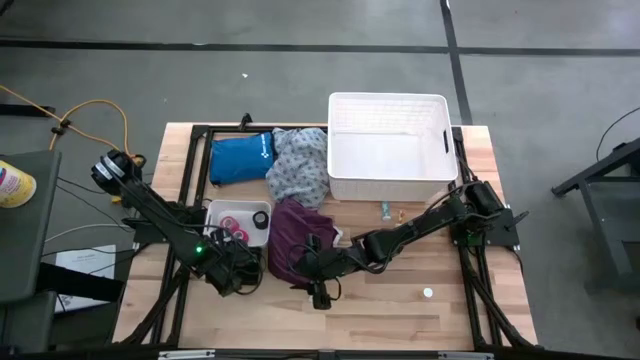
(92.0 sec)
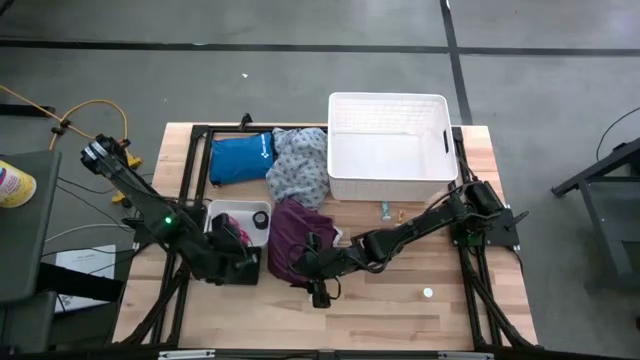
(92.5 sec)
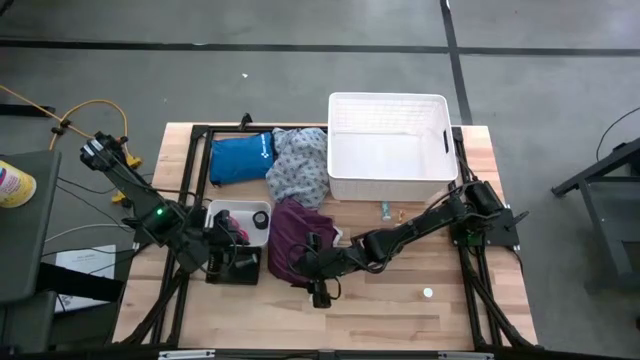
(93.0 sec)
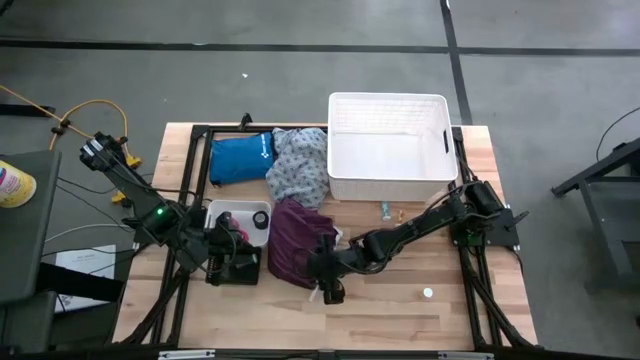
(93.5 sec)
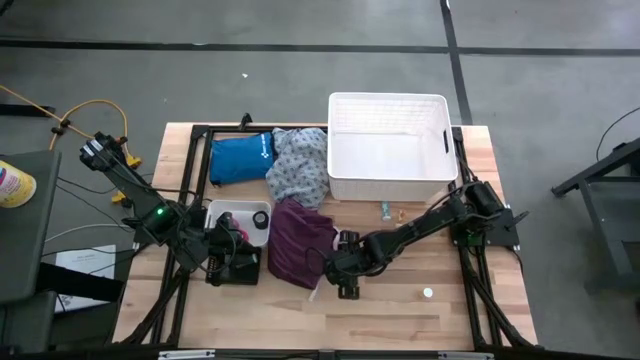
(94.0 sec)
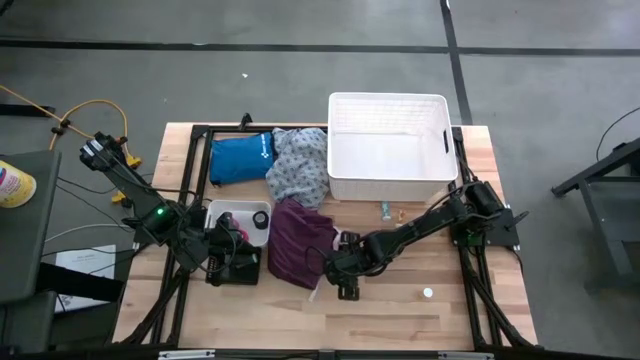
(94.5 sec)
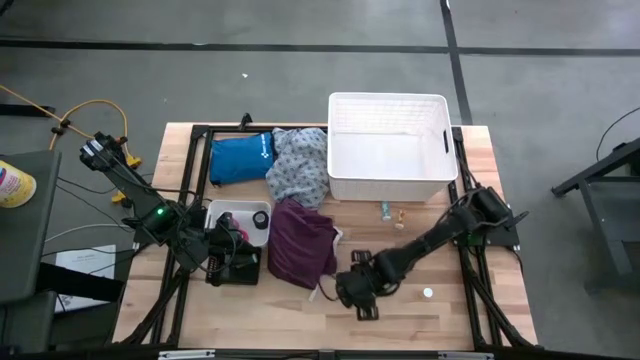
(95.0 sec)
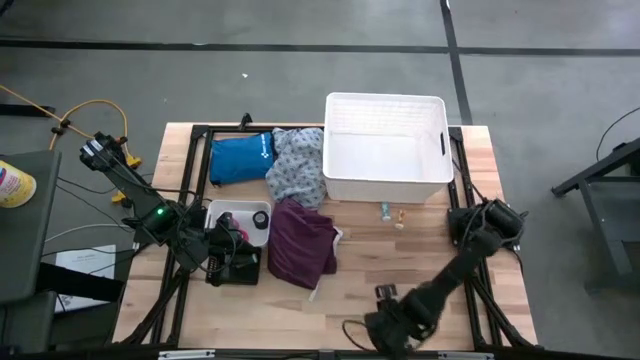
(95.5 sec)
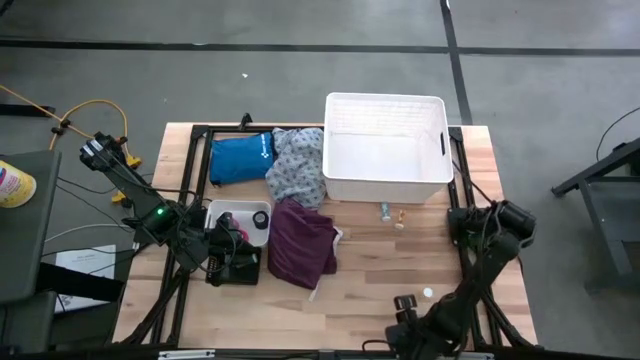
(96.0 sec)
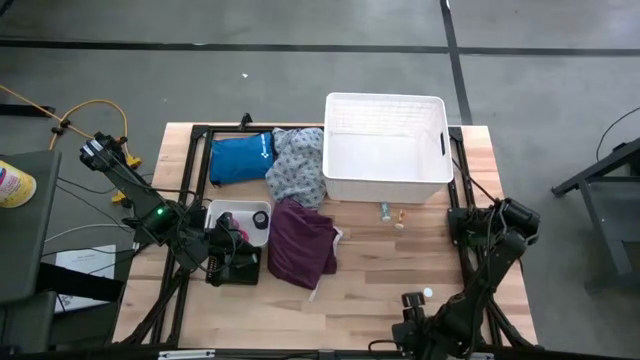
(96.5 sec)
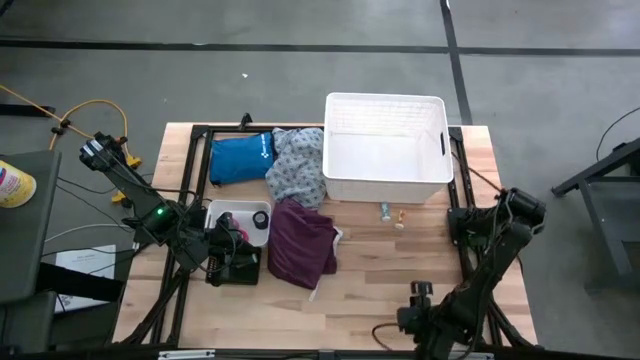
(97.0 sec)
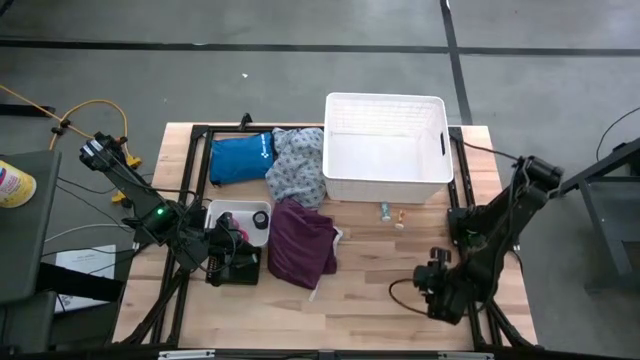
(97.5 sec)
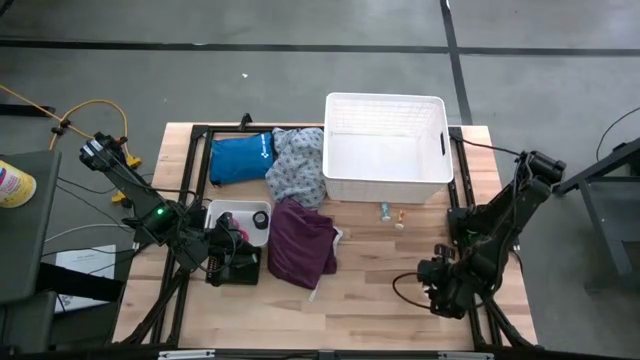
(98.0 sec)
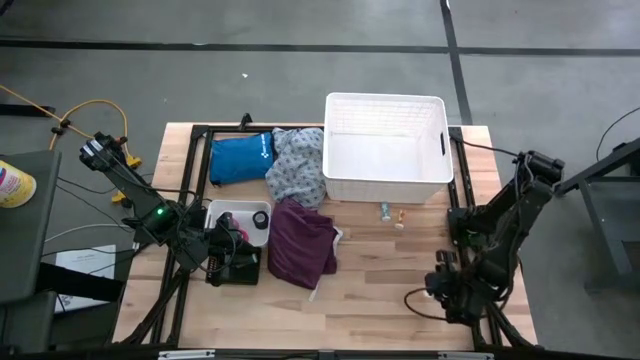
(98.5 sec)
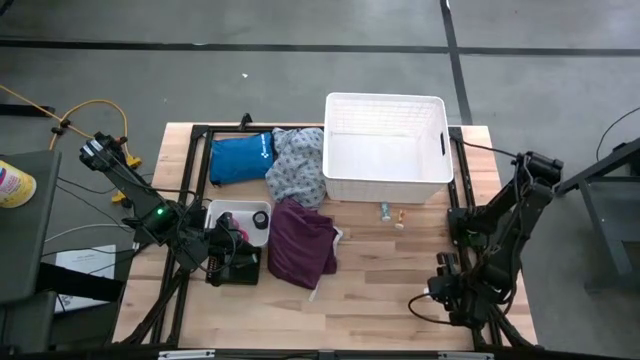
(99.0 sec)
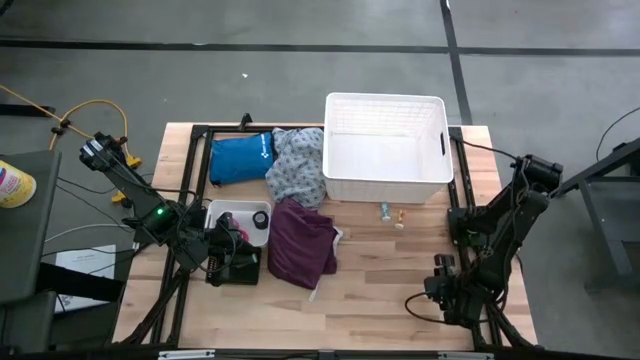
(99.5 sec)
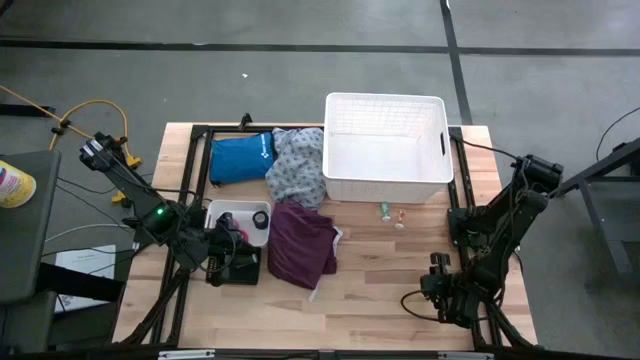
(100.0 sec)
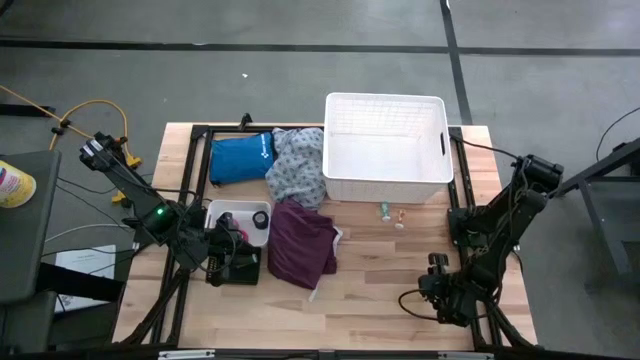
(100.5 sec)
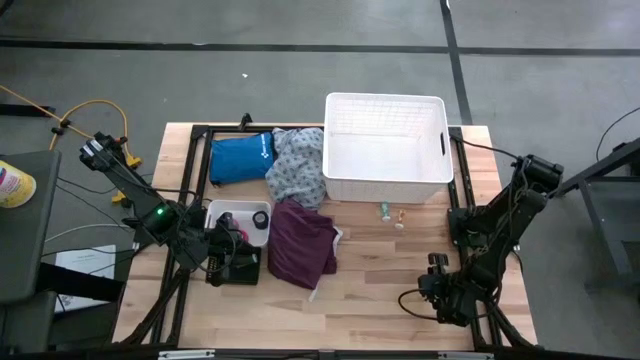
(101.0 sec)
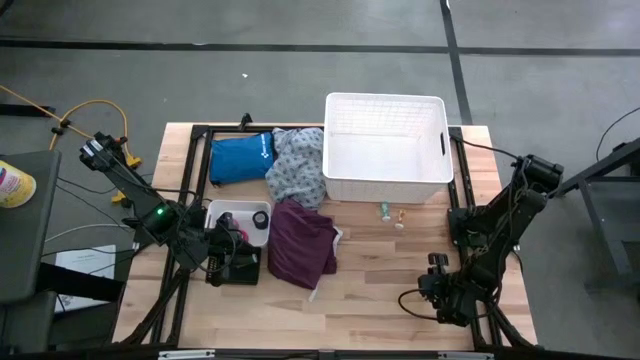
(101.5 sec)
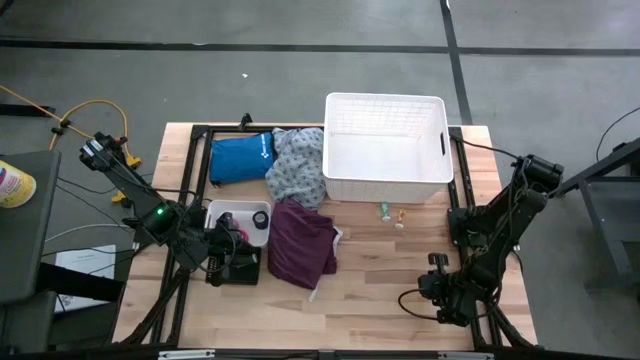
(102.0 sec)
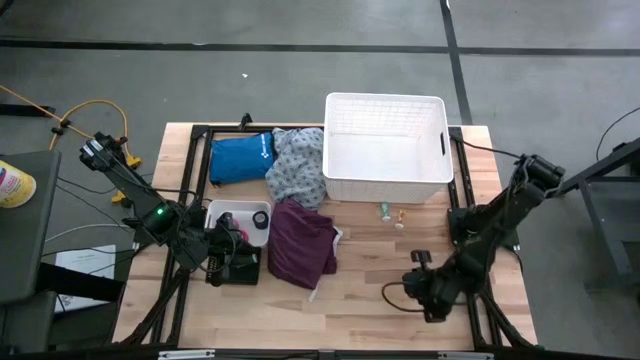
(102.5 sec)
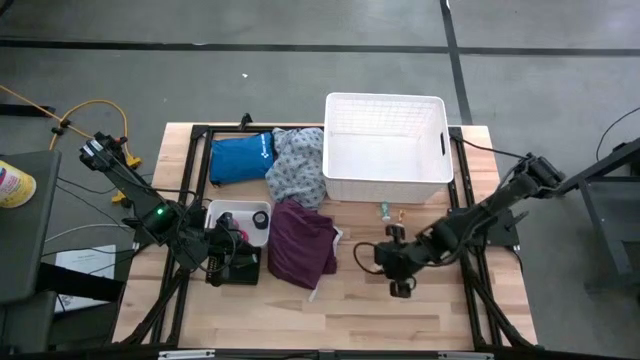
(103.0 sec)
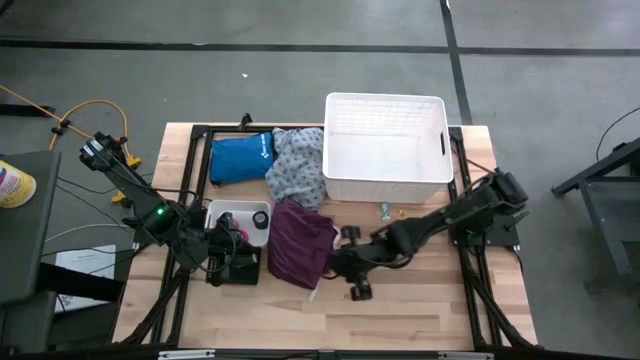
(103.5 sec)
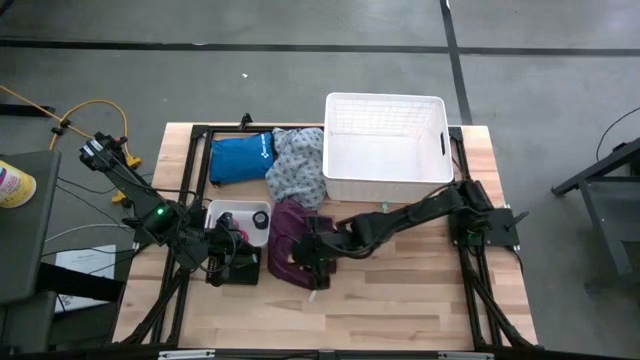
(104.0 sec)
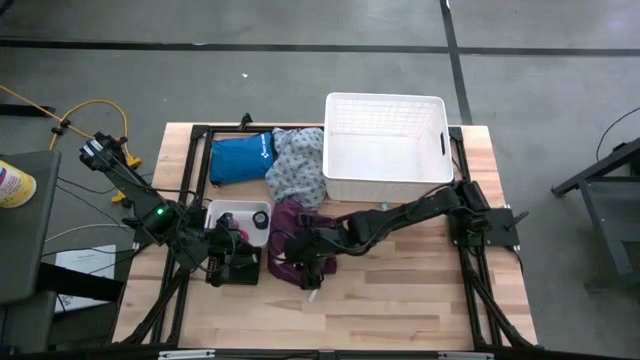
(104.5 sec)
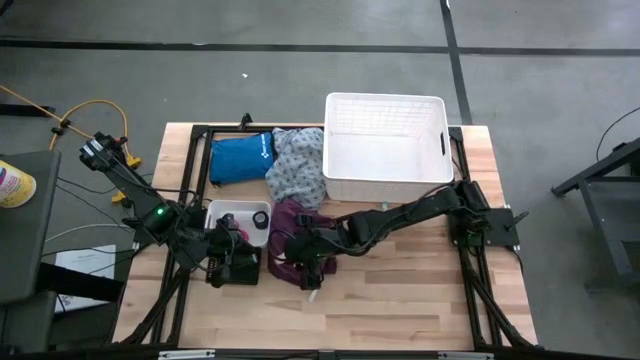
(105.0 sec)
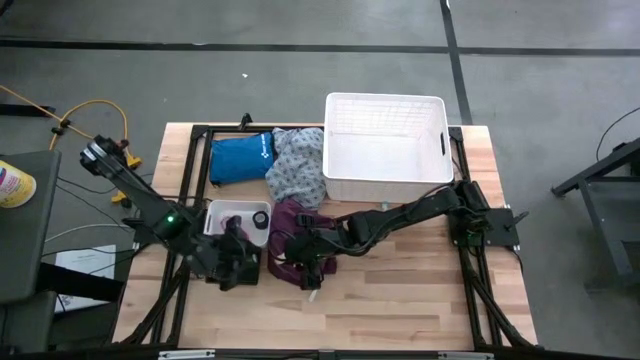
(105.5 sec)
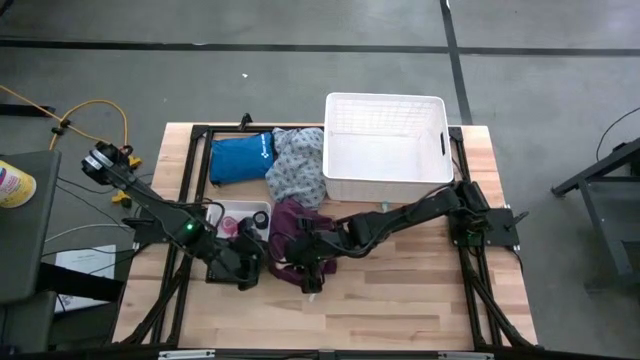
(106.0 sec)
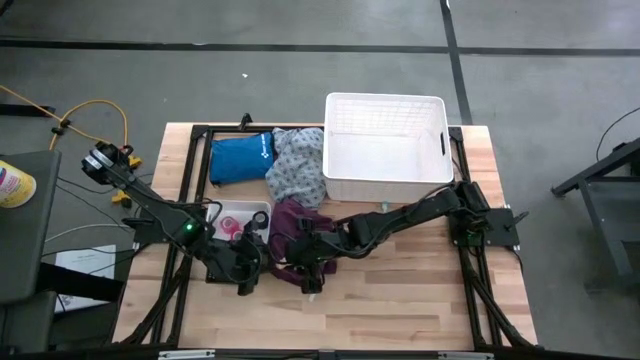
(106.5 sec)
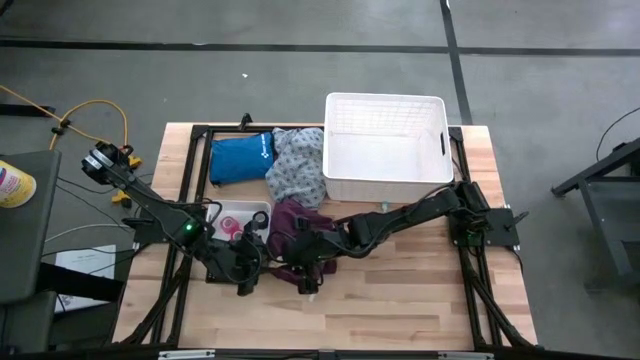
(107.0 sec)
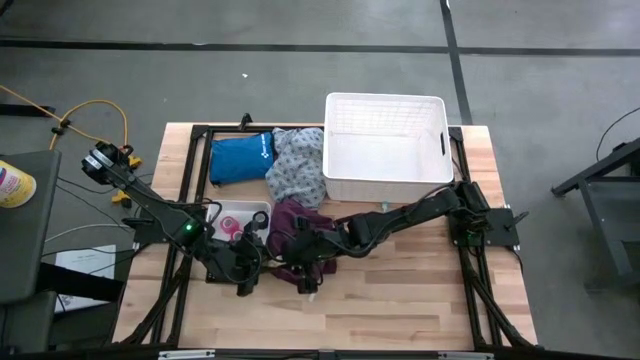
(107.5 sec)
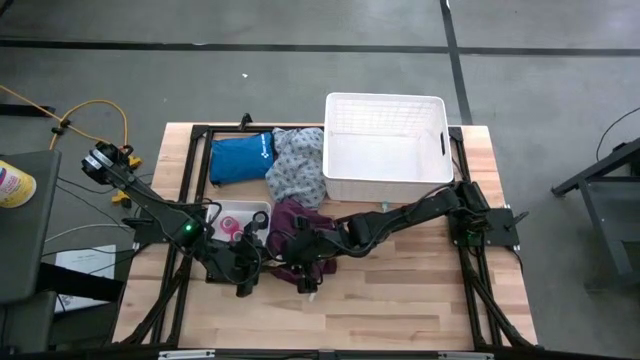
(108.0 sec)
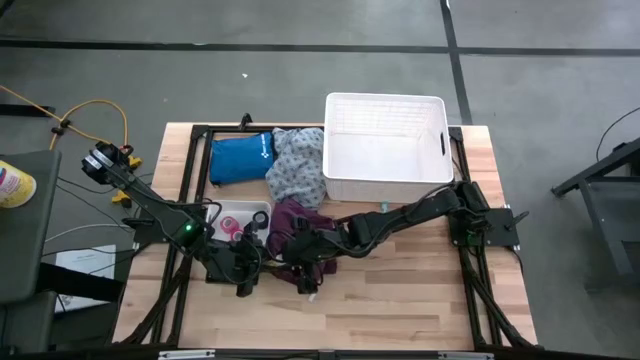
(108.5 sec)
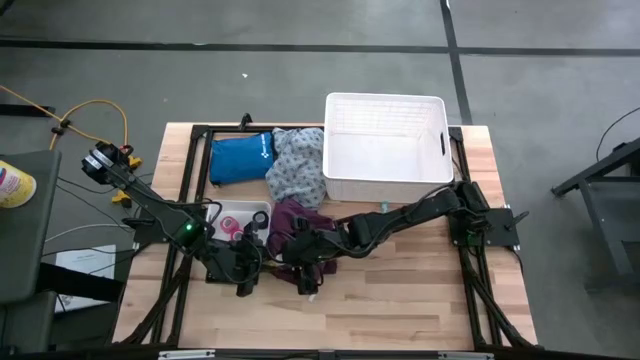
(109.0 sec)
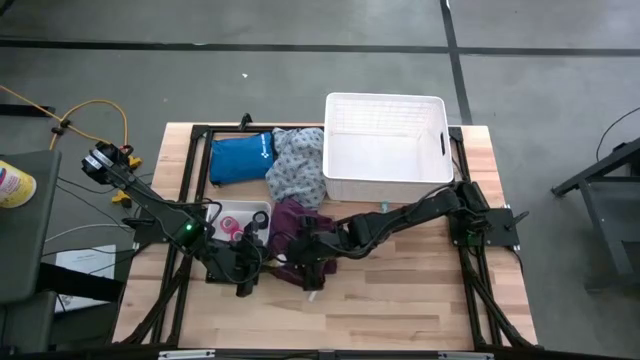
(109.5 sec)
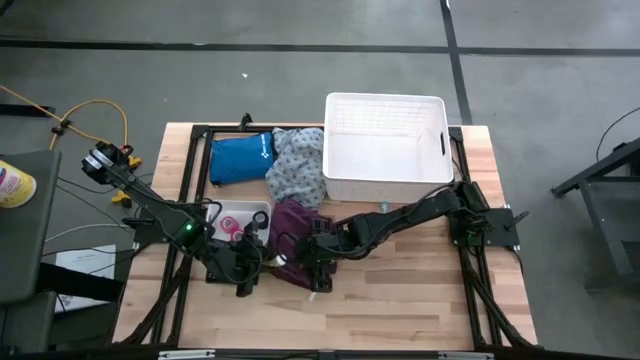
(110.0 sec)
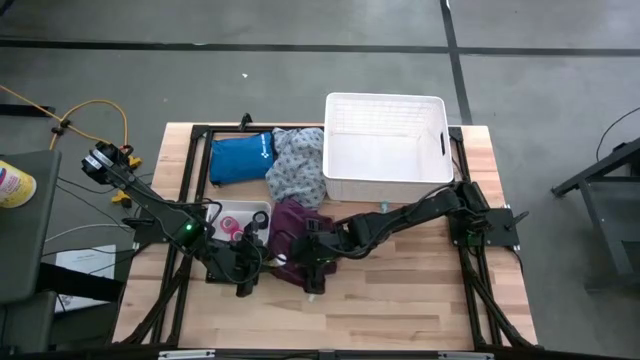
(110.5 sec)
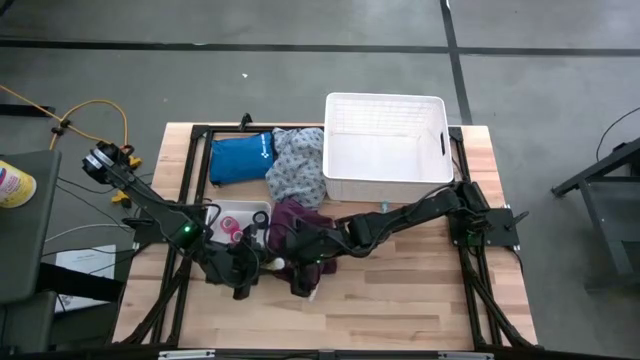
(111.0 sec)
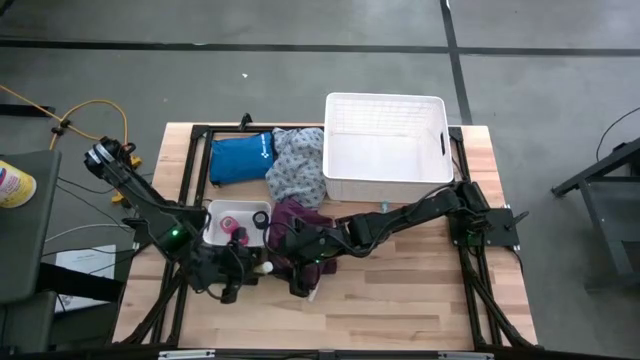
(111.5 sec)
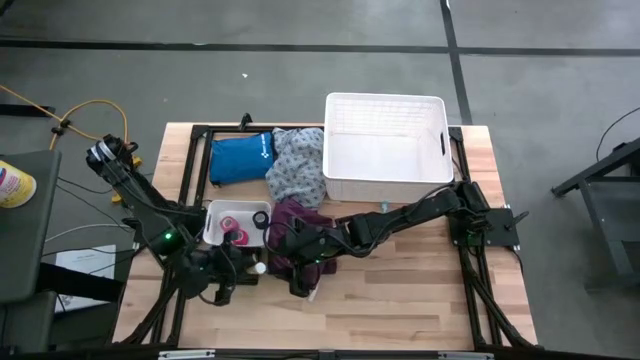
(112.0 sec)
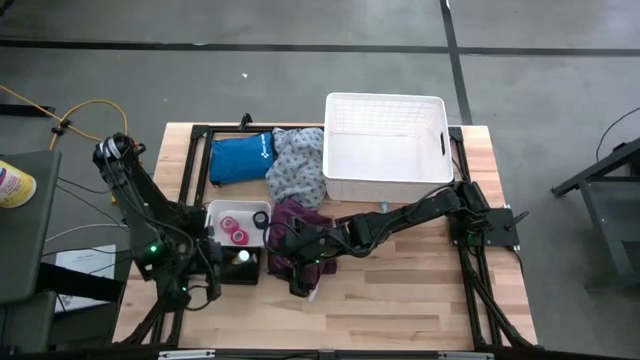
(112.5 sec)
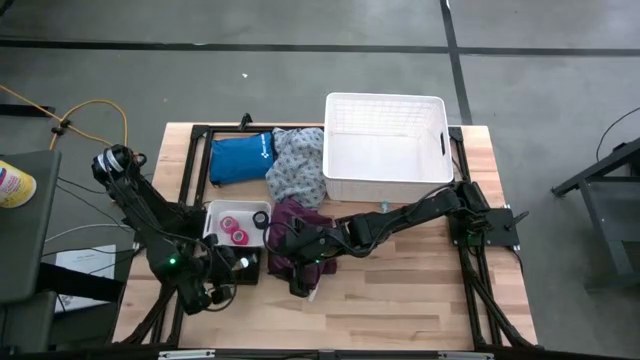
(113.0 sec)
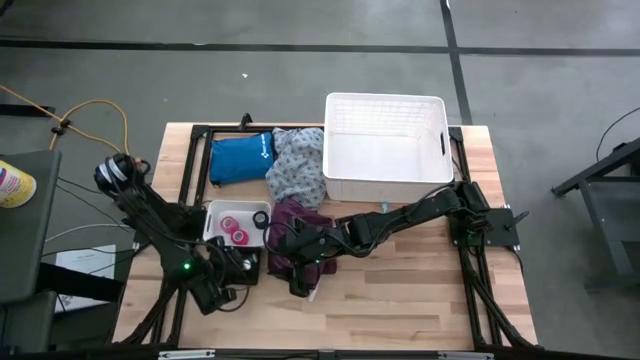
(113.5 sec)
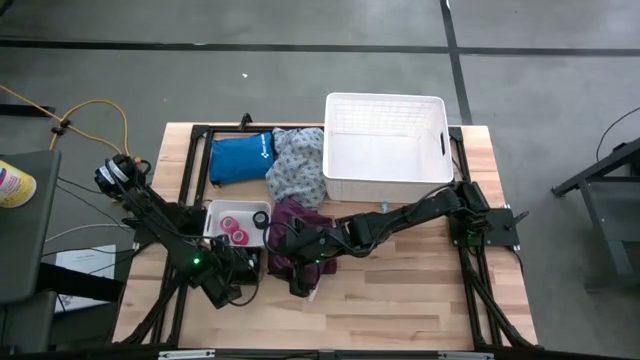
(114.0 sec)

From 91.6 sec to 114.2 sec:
Task: Pick & place medical supplies in basket/bin
Put the bottom yellow pill bottle into the black bin
